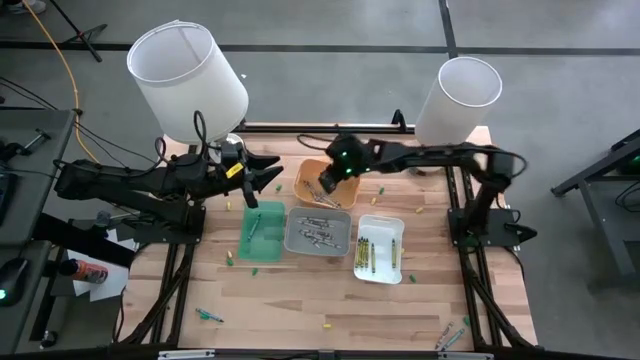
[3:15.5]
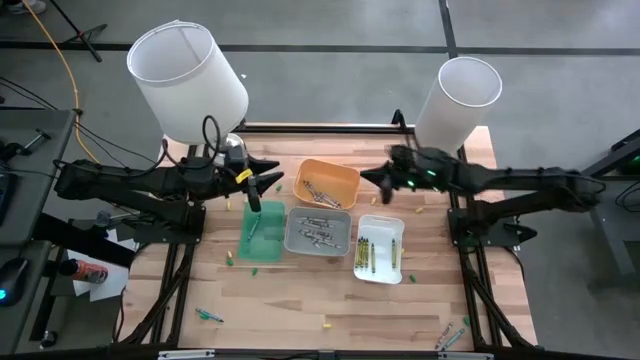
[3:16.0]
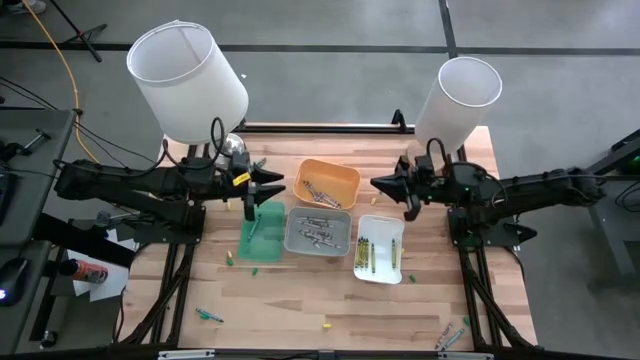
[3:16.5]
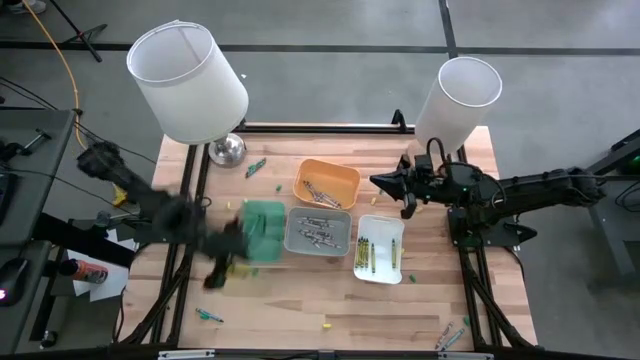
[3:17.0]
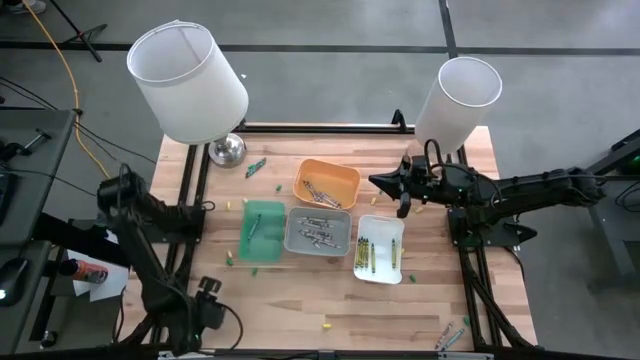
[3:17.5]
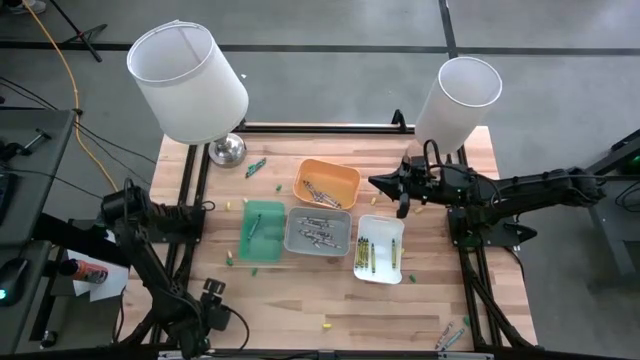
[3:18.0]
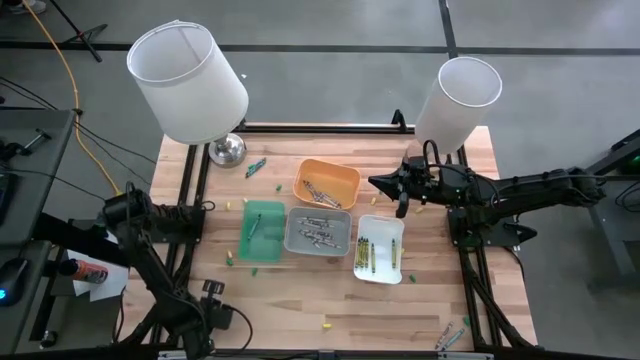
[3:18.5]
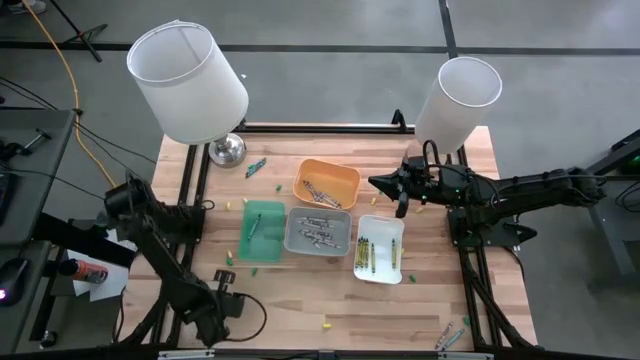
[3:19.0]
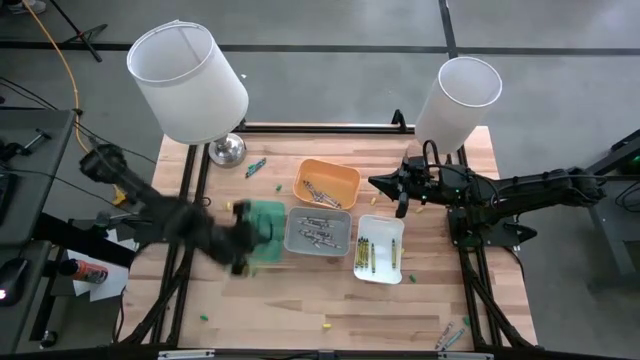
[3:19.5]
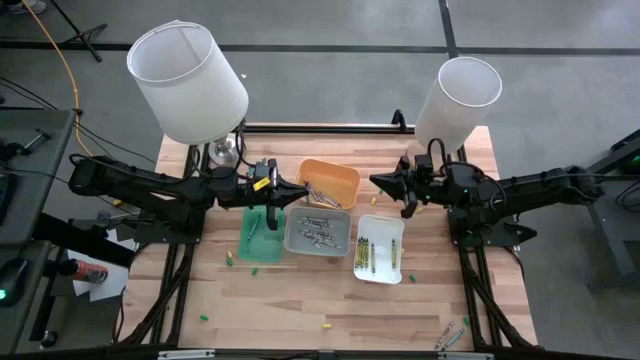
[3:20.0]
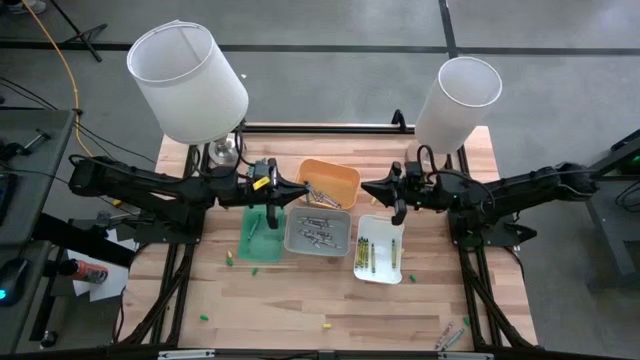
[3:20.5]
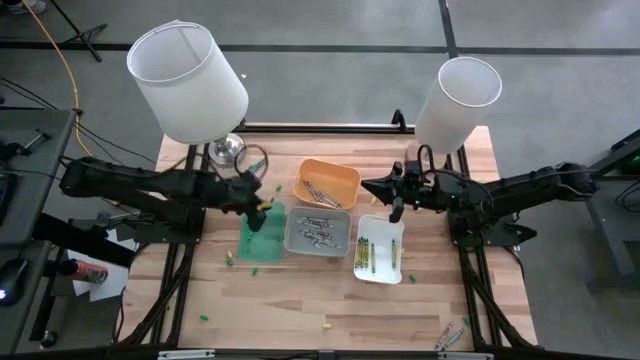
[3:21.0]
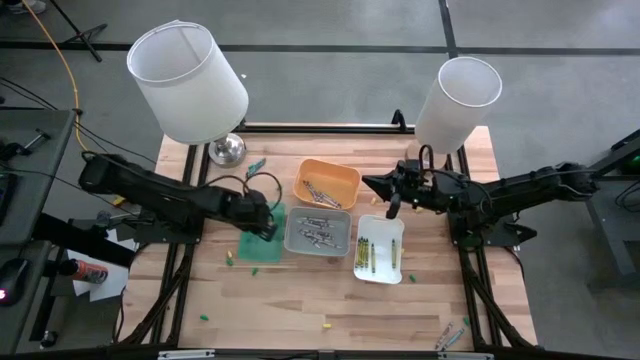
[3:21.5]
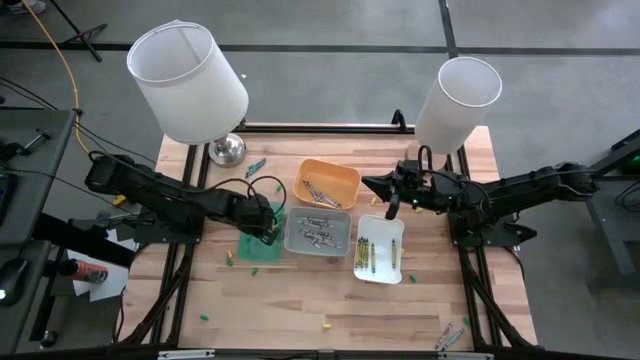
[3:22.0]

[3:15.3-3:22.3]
Task: Sort crayons
Put the blue crayon into the light blue bin

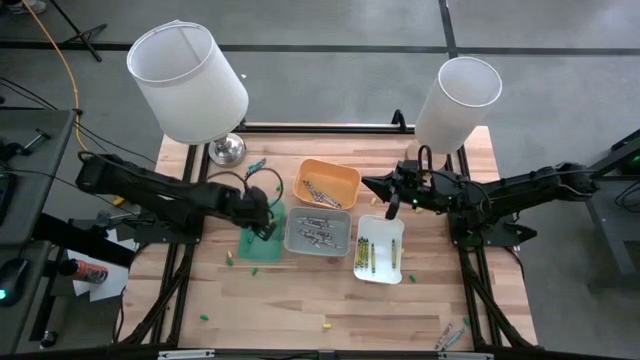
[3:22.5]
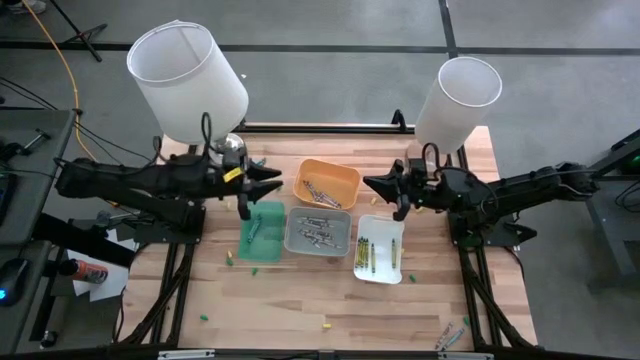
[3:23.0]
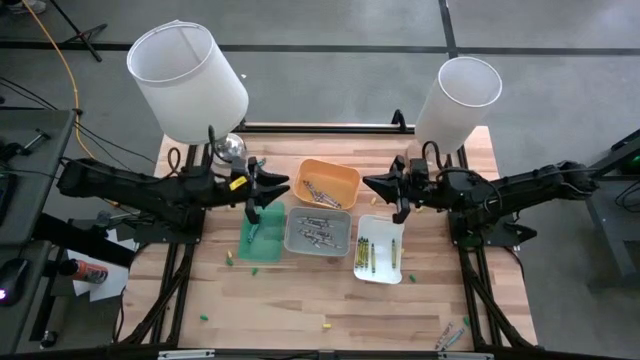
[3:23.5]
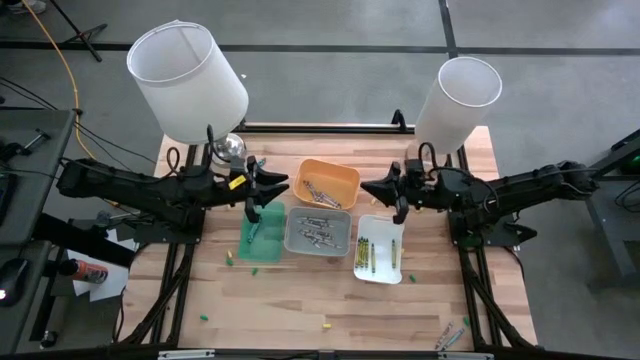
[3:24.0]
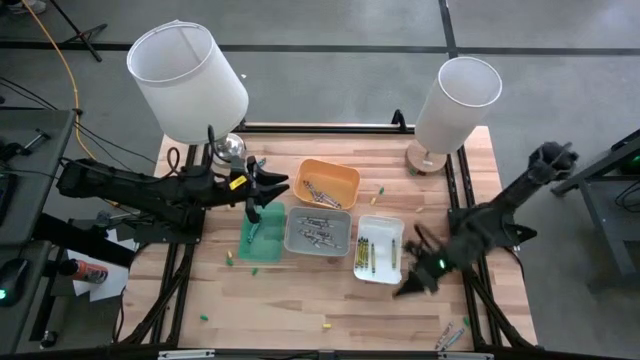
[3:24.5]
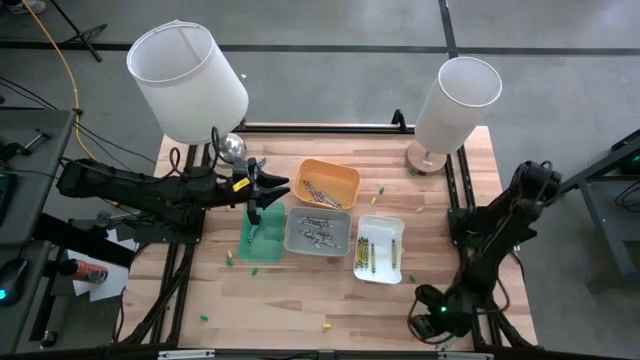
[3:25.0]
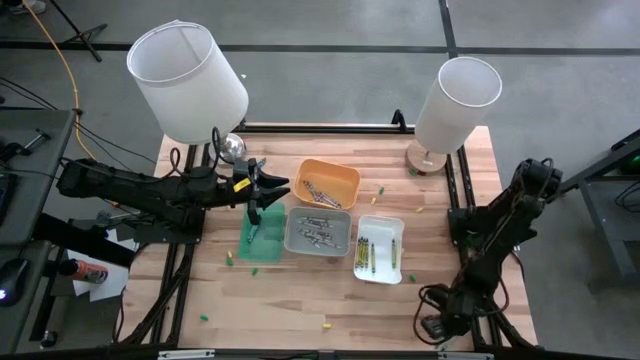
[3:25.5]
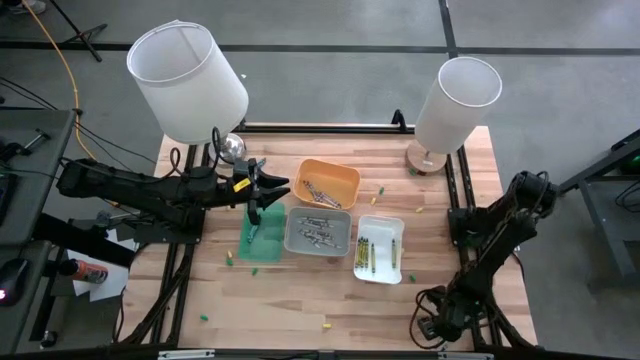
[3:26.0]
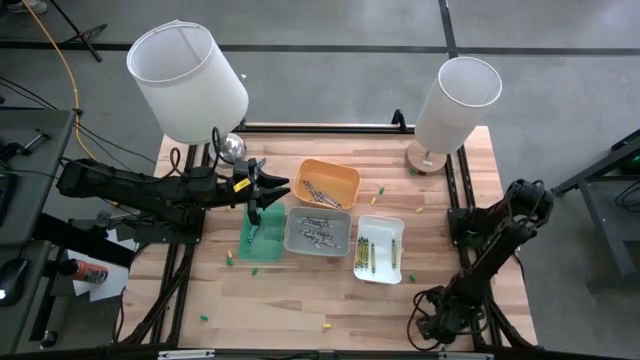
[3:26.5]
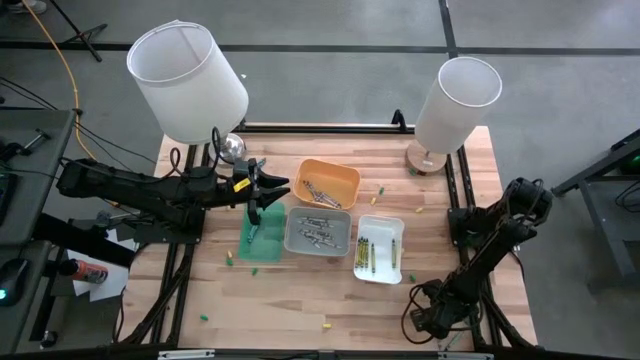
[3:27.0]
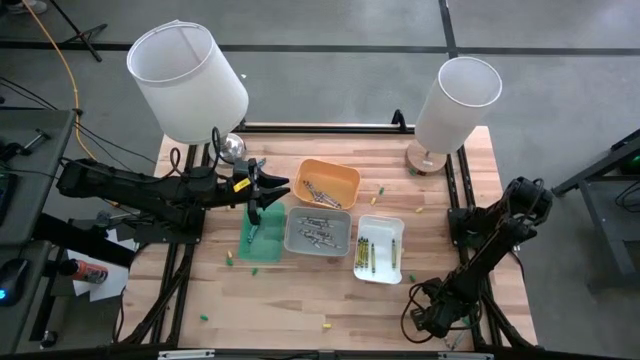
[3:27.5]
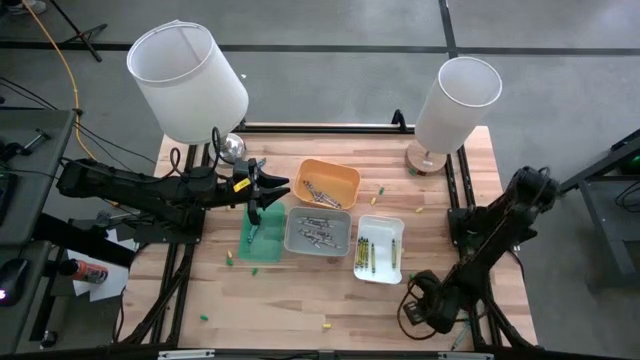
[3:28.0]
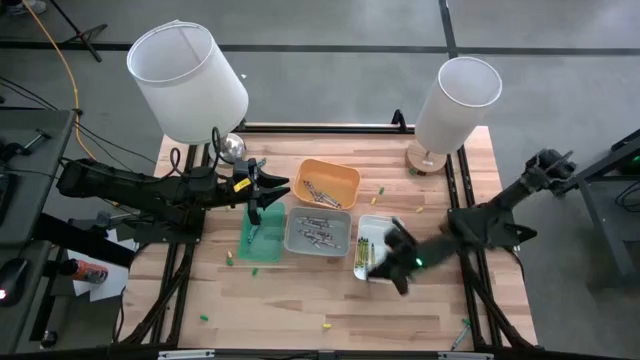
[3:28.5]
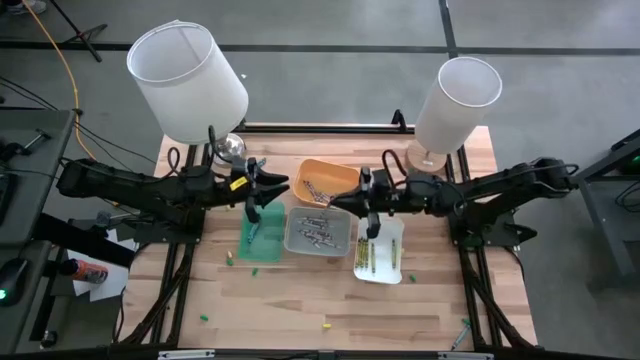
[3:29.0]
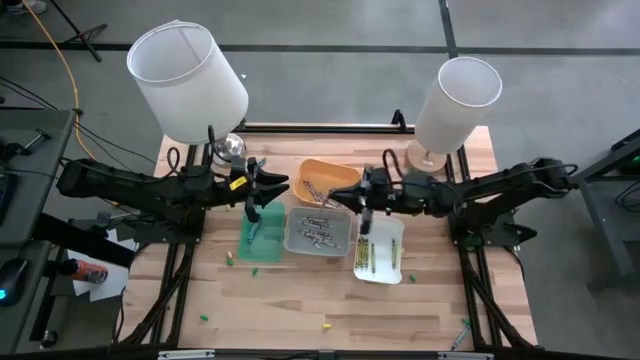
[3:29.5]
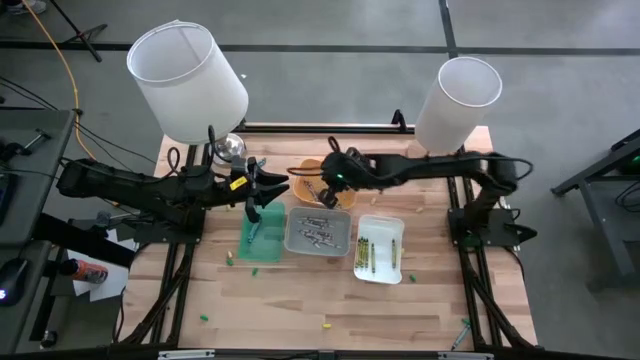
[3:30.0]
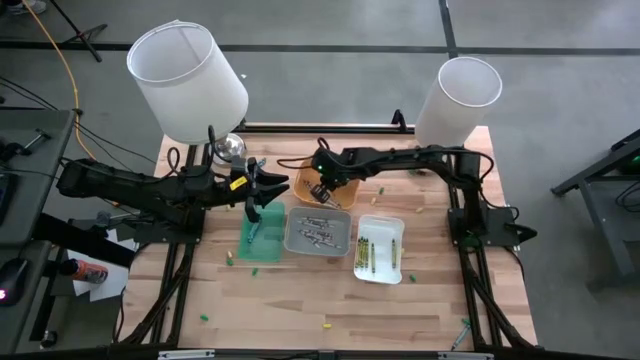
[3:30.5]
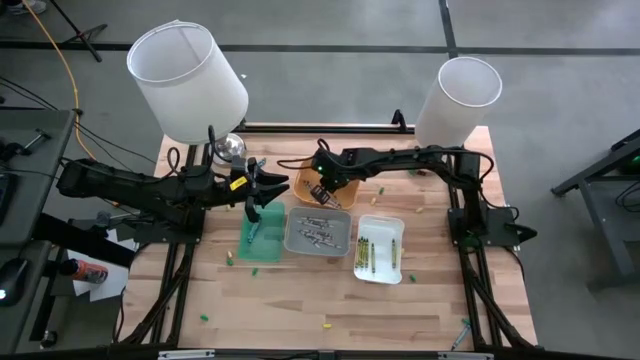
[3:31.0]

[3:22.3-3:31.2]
Put the gray crayon into the yellow bin

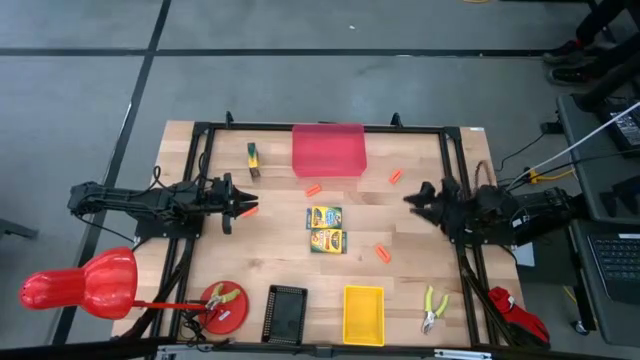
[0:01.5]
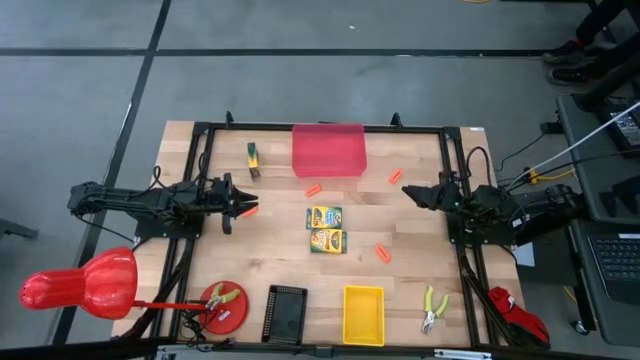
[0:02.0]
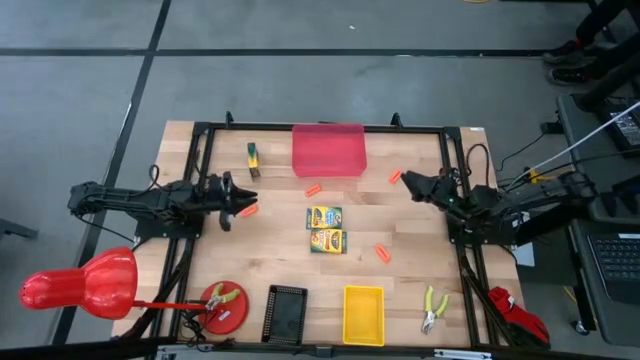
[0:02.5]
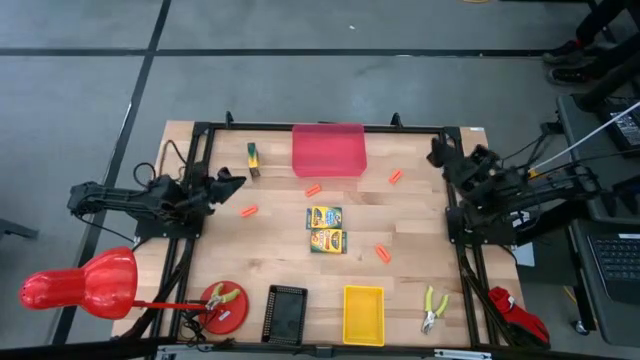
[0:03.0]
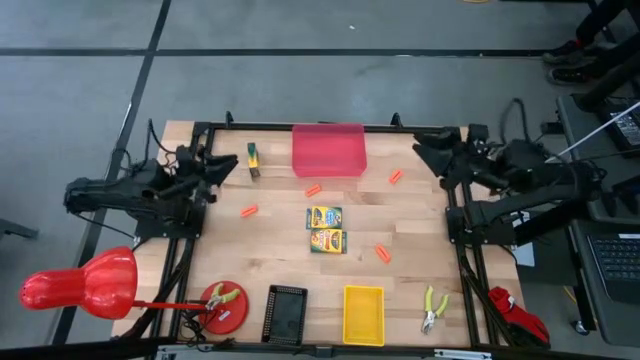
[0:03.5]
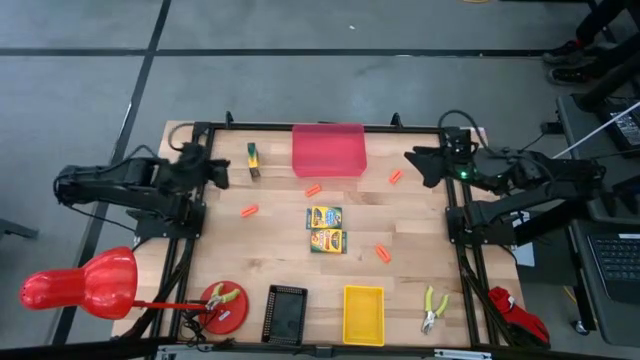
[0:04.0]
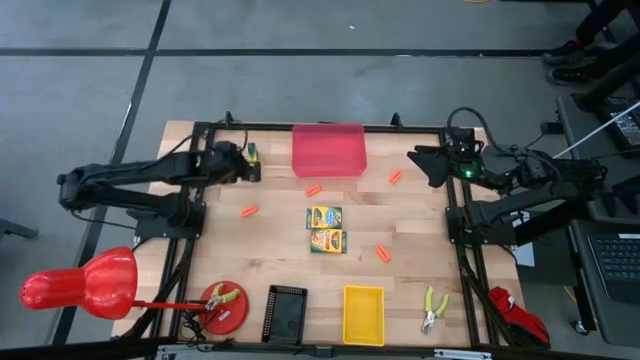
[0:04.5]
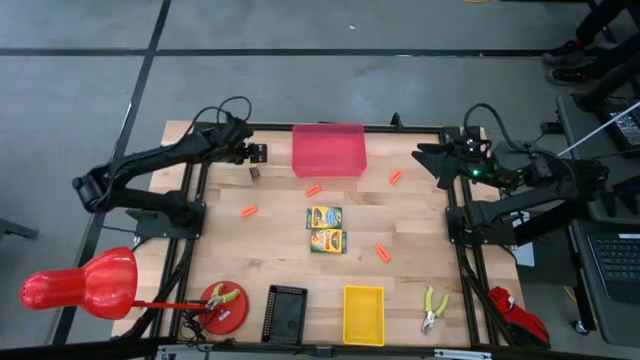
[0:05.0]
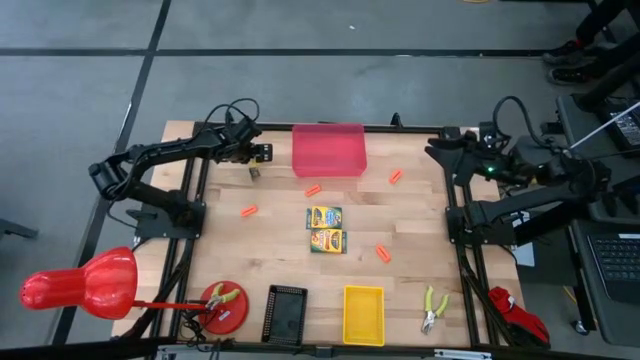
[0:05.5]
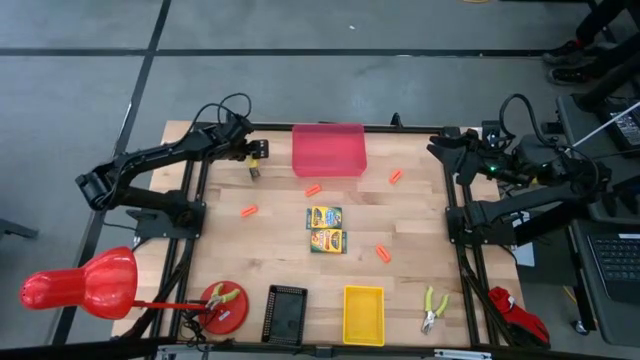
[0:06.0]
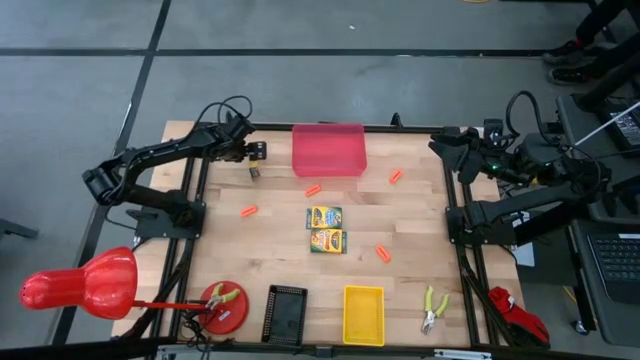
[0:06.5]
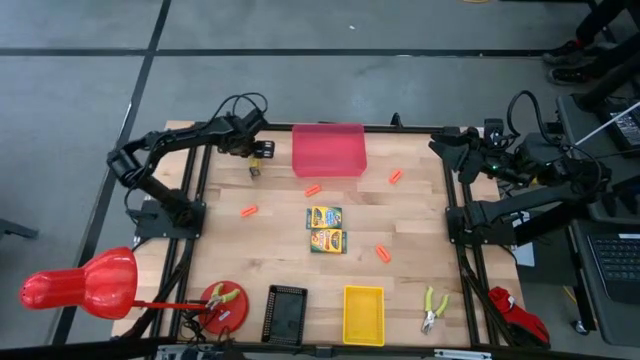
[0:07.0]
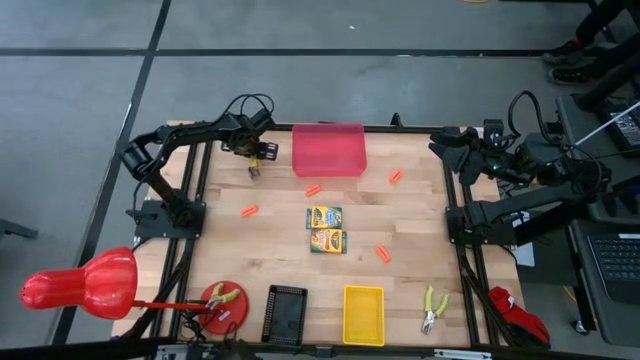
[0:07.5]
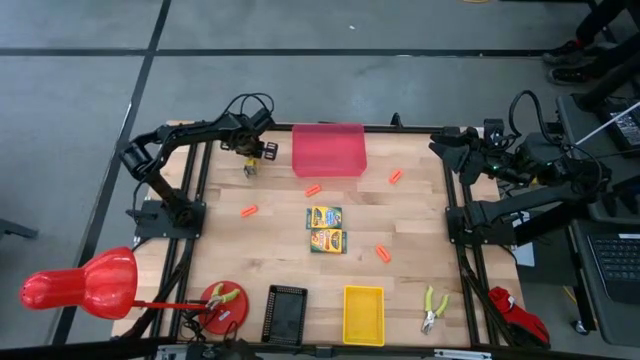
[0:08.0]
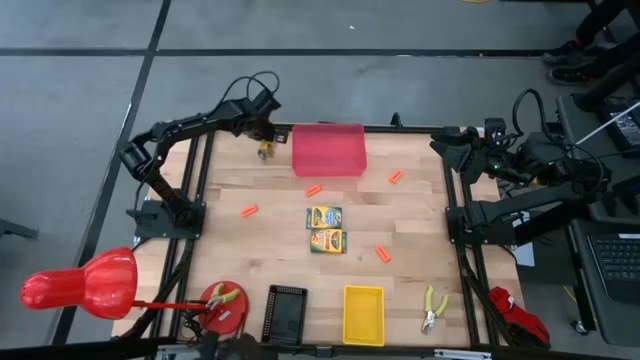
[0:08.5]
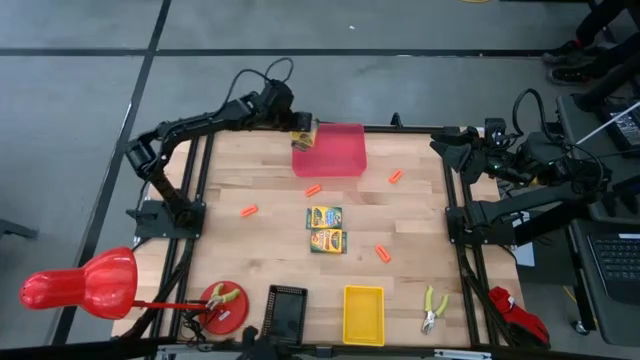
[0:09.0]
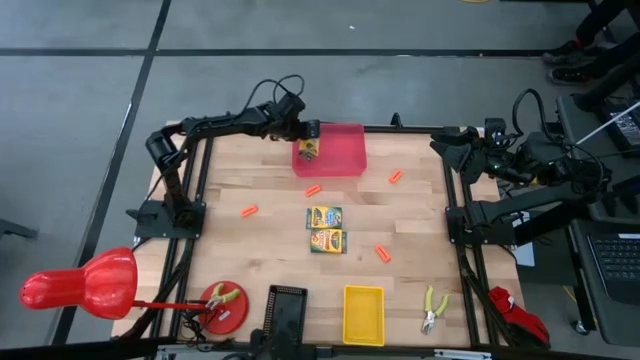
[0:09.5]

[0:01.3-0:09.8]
Task: Pick & Place School Supplies
Put the yellow crayon box into the red bin
